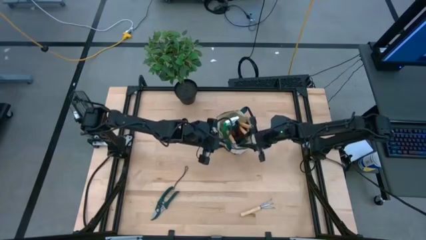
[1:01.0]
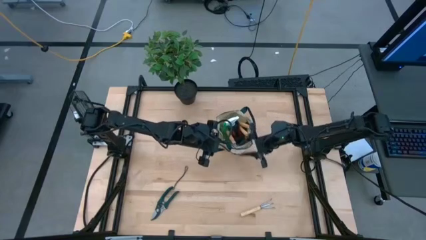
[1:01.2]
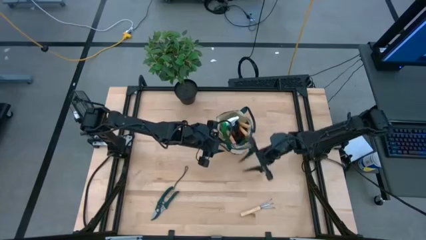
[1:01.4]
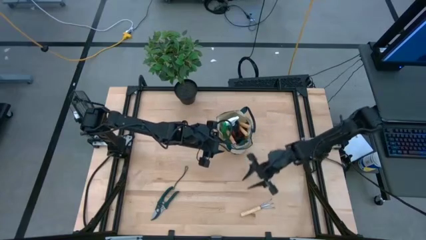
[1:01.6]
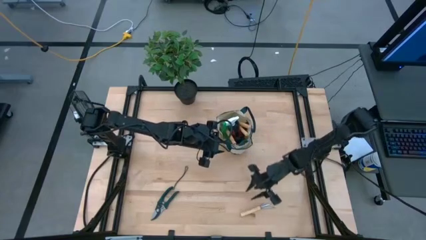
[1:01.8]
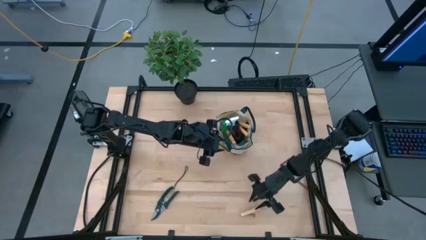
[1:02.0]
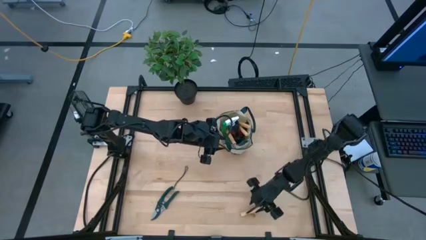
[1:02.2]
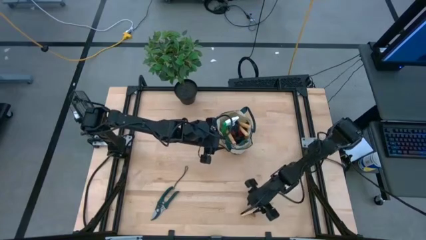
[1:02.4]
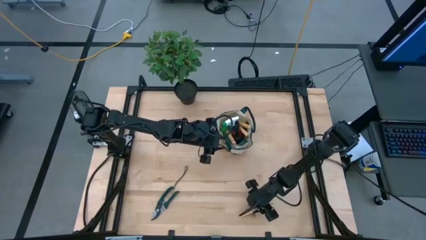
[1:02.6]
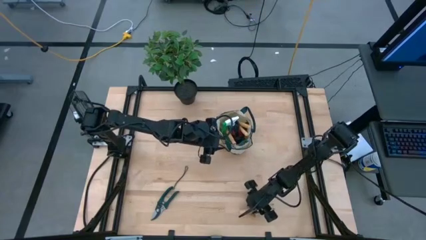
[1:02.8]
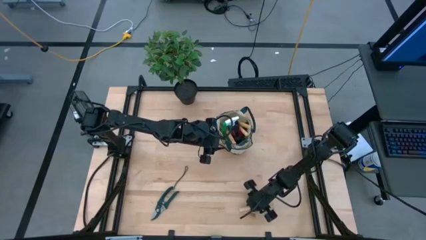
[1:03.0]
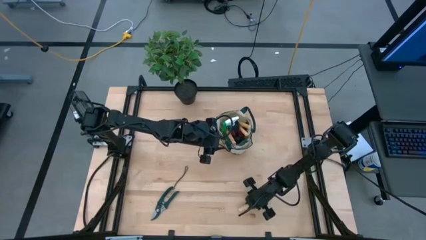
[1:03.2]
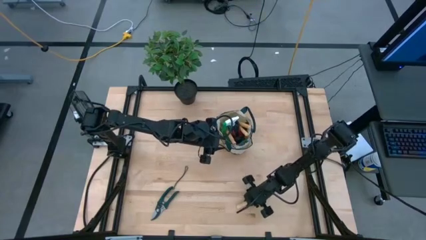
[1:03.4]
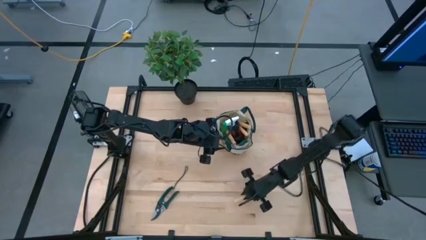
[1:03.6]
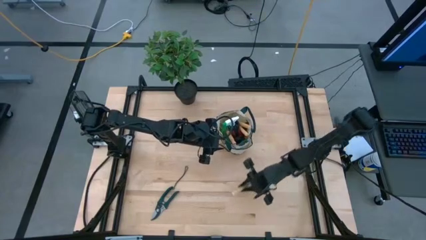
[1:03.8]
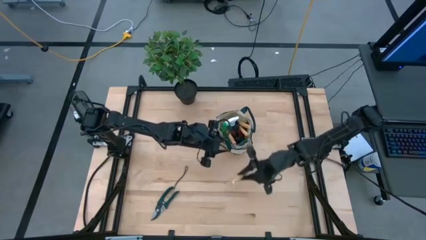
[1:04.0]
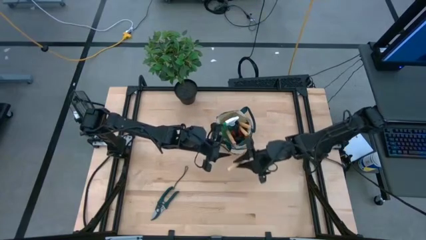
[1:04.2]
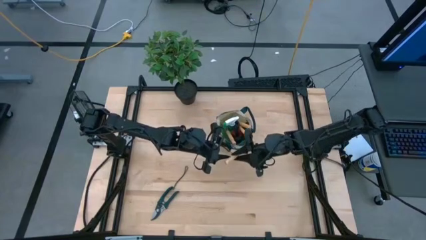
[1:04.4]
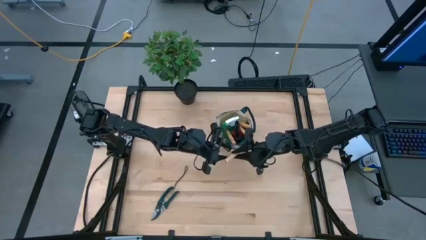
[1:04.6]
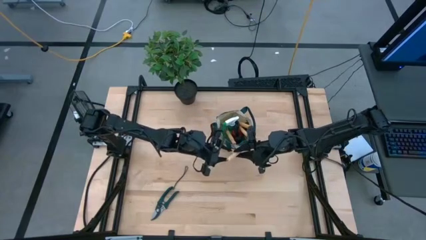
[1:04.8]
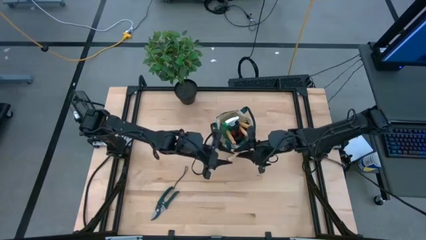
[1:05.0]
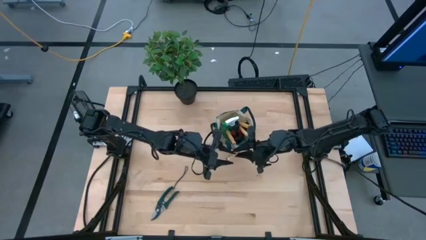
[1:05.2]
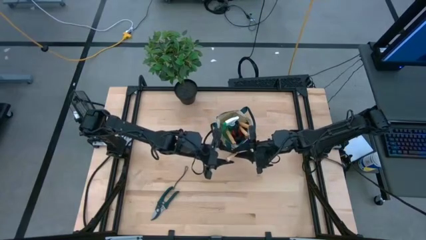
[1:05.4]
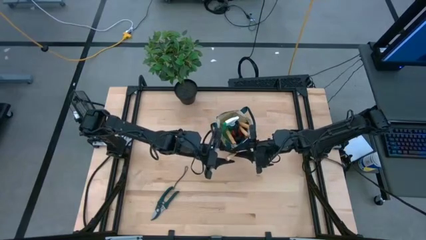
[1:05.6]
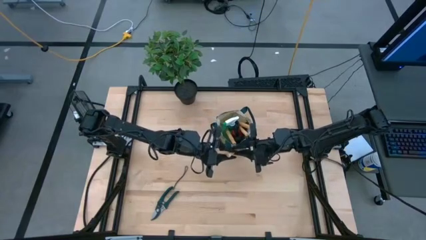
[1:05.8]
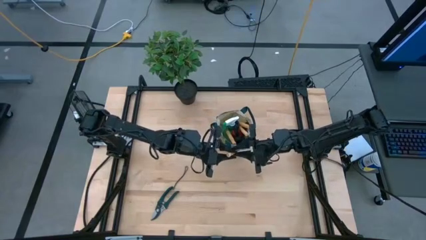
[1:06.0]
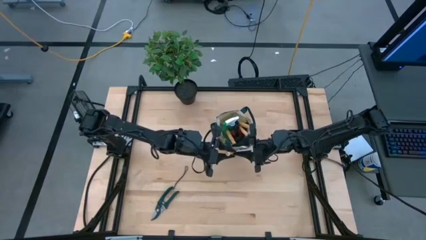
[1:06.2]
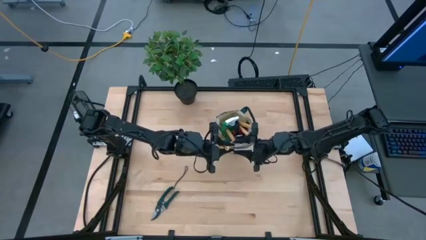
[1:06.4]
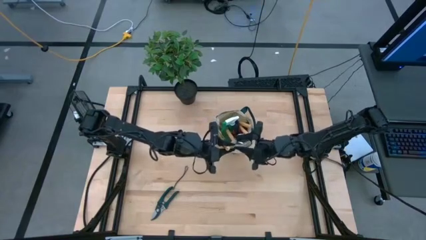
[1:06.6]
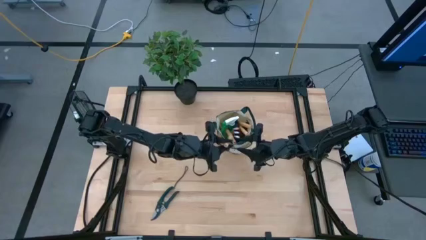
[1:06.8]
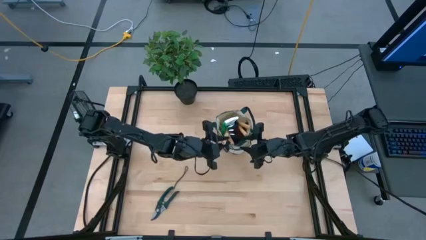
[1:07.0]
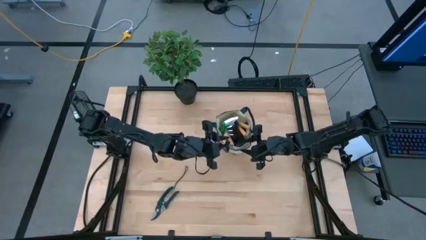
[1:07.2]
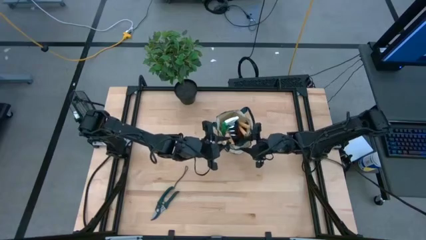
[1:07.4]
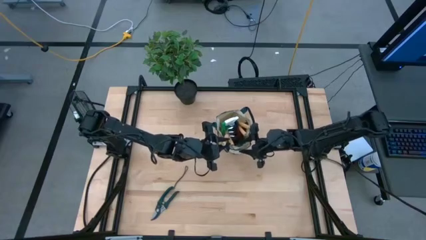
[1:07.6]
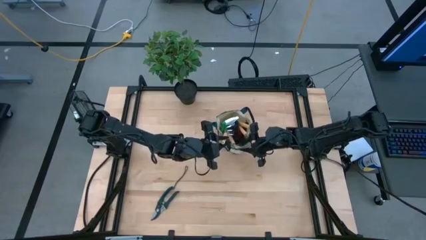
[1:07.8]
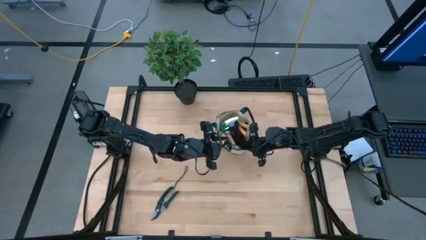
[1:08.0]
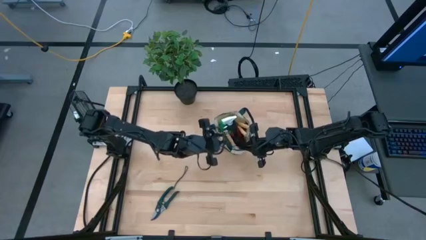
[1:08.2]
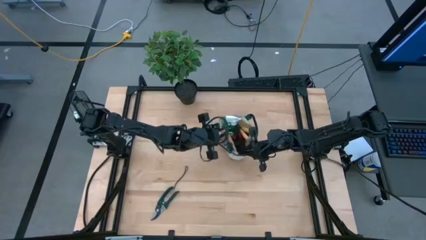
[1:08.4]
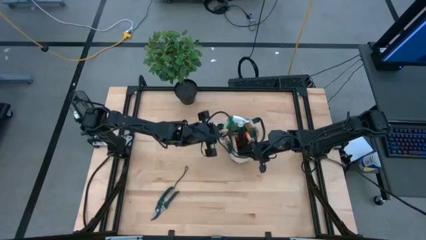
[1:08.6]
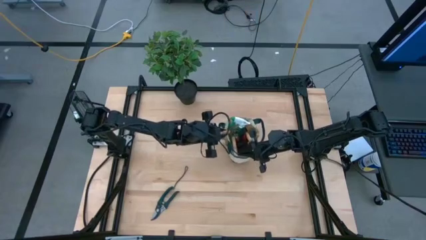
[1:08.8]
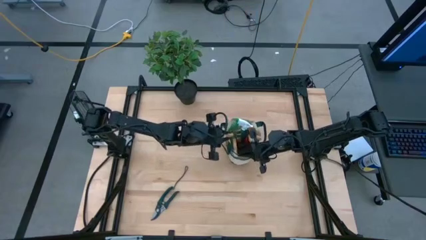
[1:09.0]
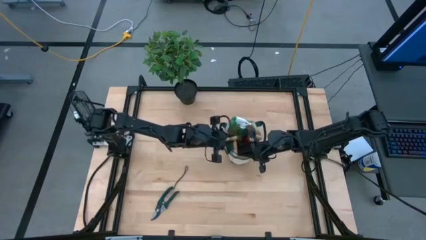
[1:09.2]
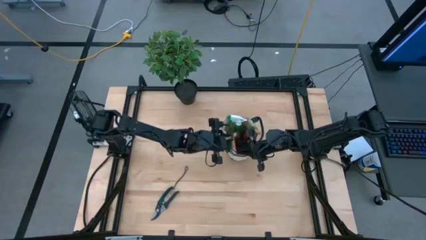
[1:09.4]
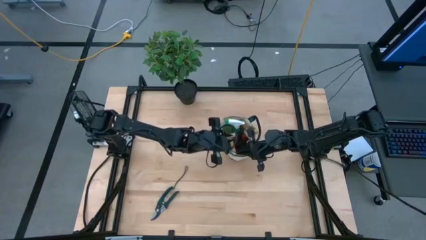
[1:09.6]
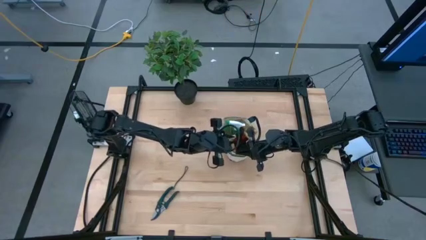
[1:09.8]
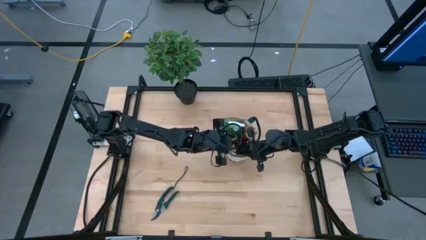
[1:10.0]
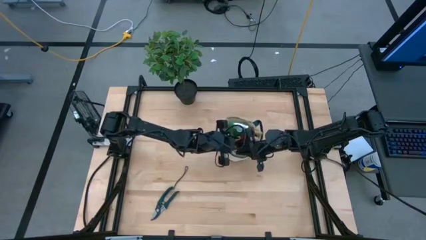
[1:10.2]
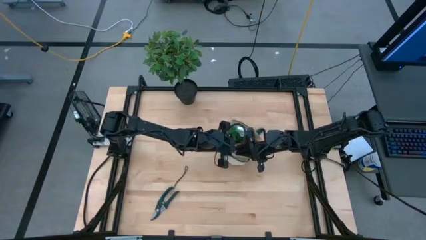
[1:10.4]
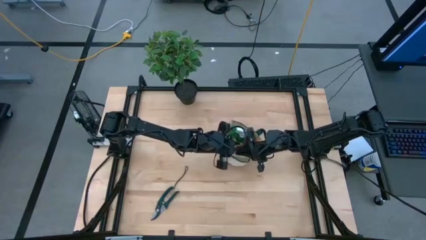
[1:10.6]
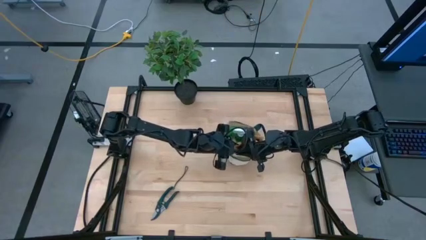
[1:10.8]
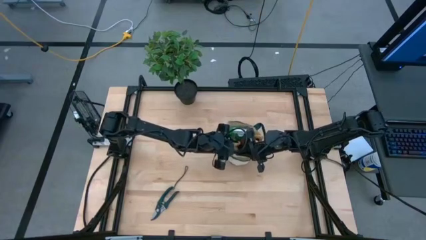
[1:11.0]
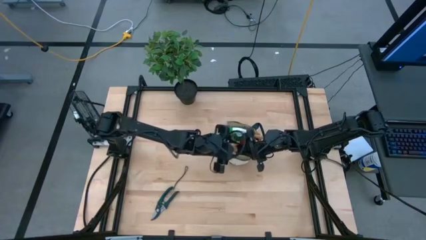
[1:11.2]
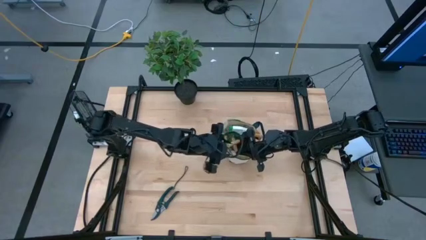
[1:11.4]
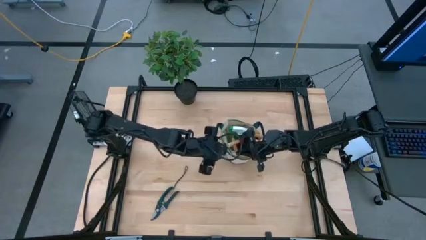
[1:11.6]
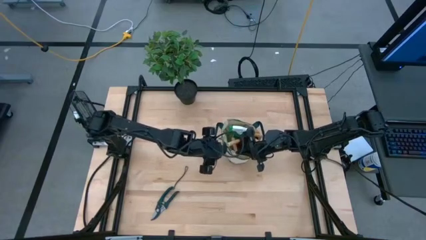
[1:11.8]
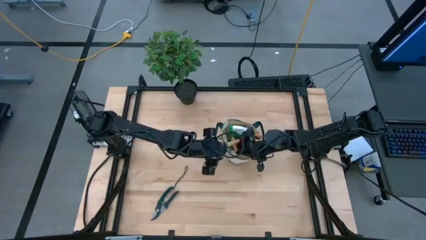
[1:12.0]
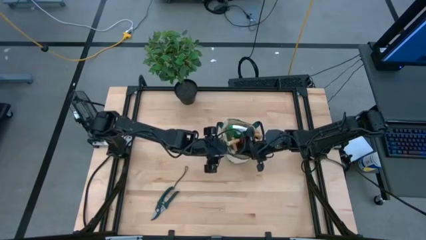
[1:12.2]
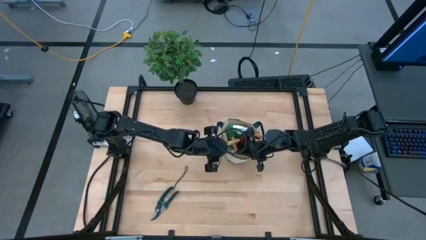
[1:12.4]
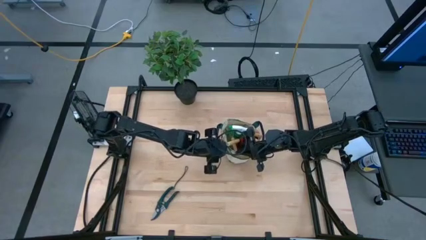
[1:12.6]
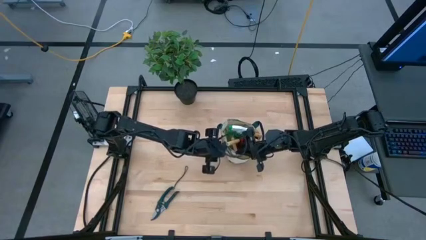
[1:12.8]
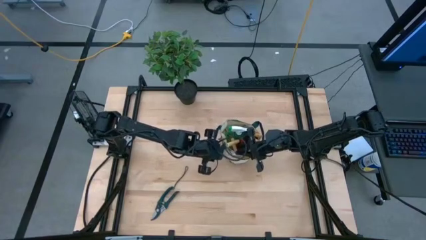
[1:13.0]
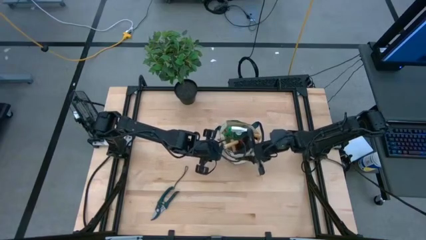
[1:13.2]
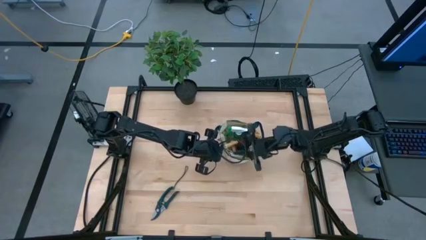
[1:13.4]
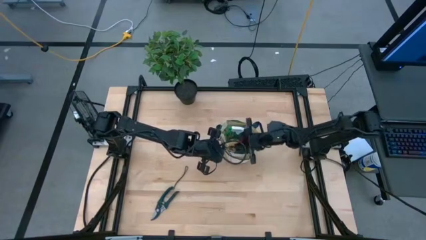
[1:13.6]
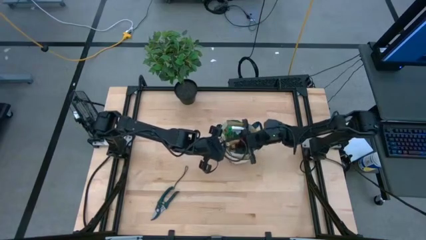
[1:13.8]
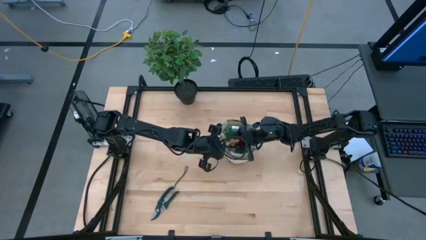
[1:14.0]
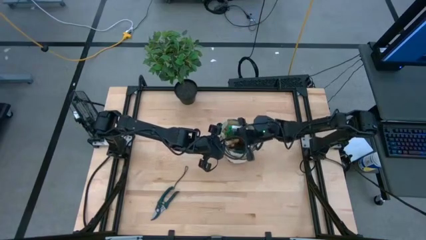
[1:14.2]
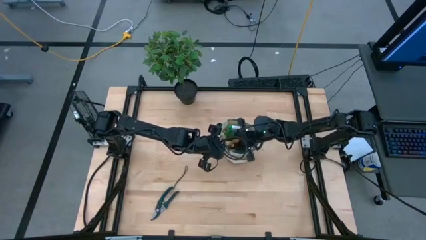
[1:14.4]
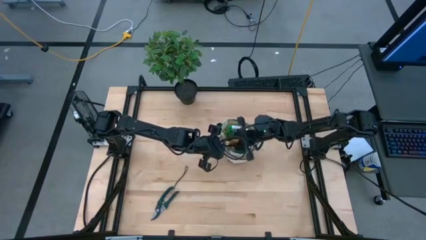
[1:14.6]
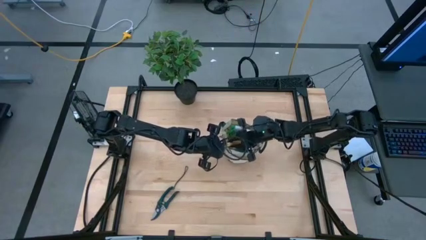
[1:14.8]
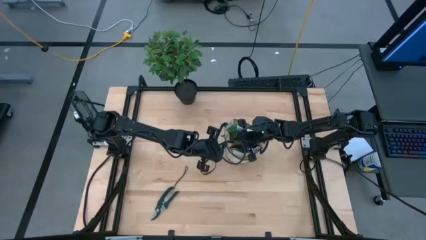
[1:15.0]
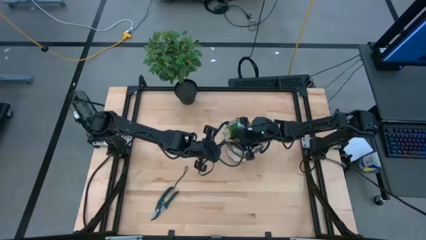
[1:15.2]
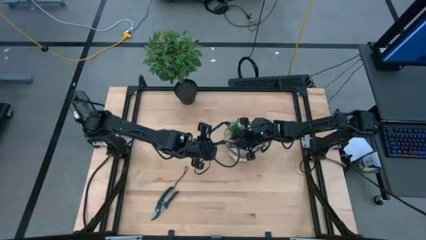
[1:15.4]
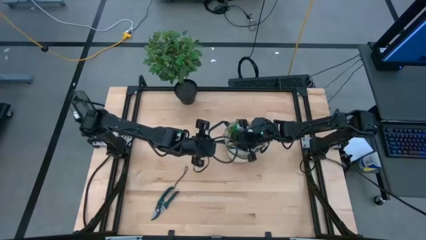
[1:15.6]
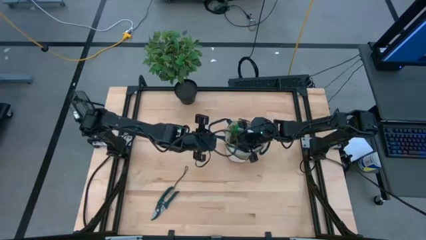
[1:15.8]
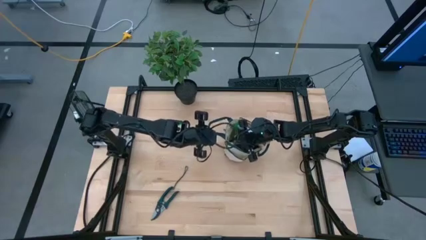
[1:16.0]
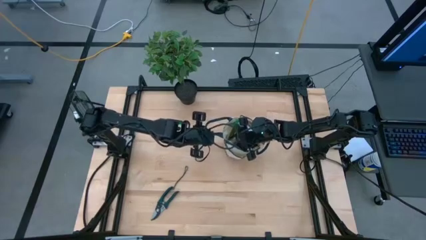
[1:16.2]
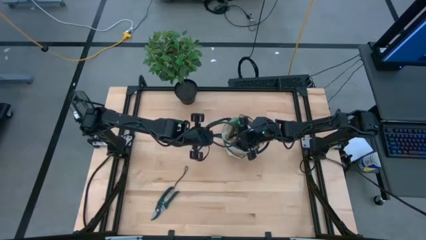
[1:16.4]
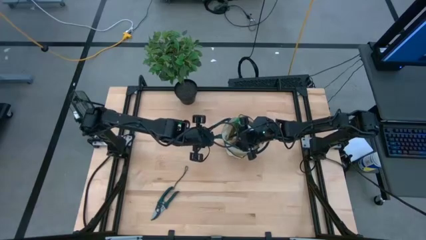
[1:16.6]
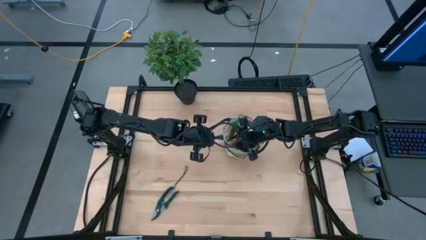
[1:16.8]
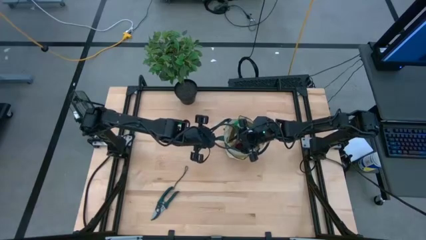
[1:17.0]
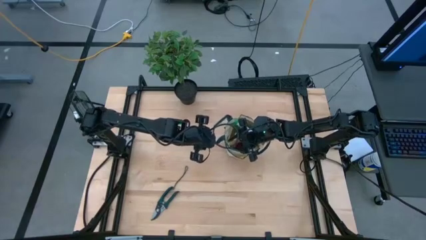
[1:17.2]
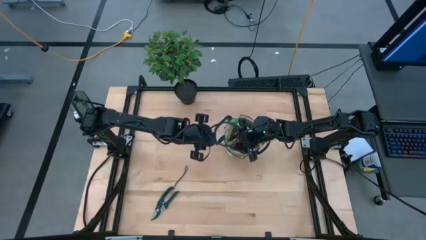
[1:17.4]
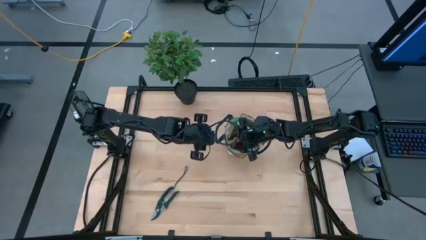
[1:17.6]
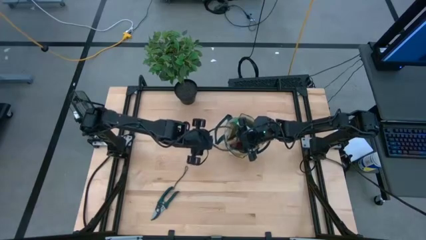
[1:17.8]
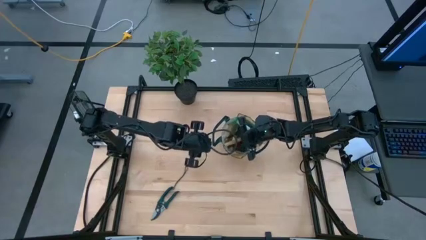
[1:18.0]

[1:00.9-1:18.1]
Task: Pick & Place Garden tools in Gardening bag
Put the brown hand rake into the light brown gardening bag
